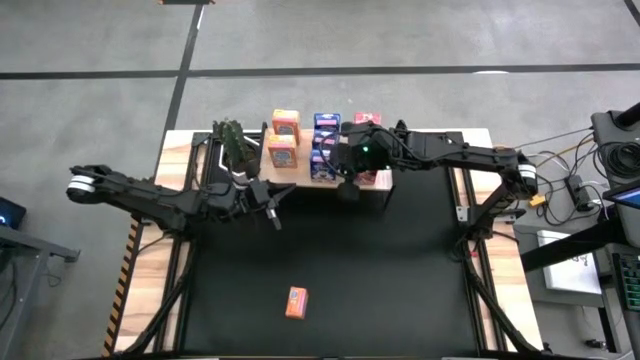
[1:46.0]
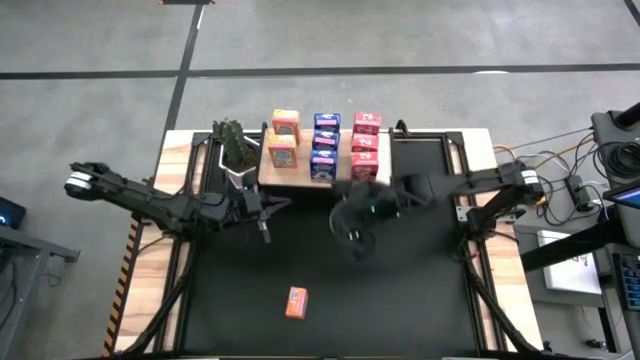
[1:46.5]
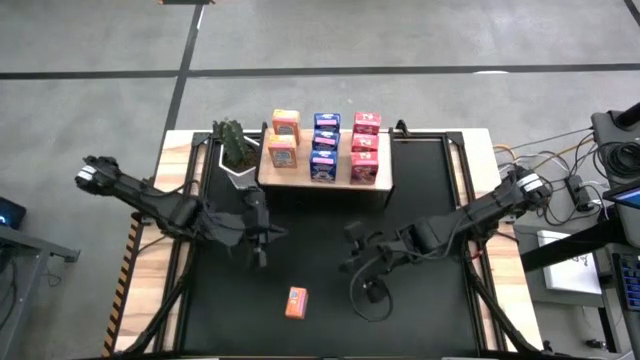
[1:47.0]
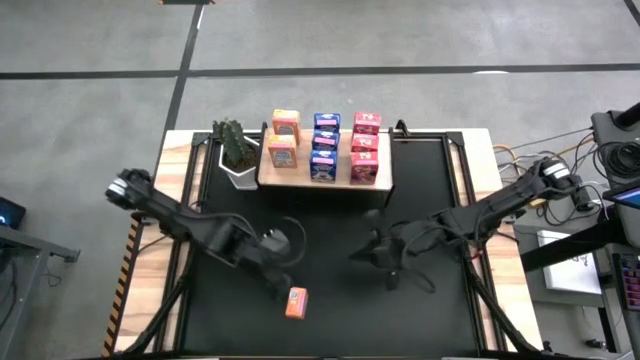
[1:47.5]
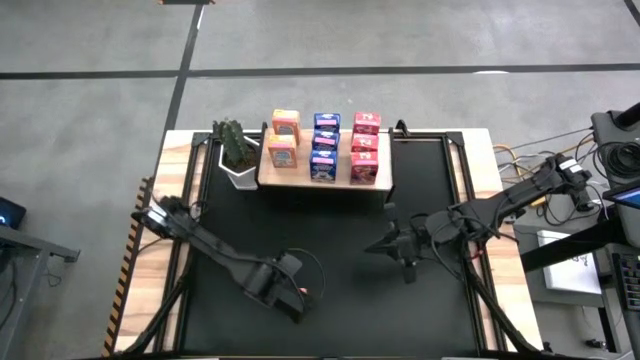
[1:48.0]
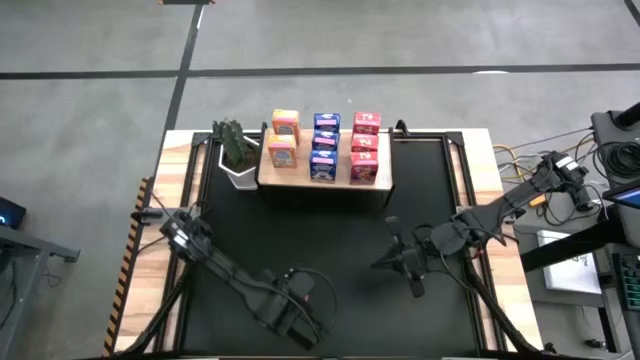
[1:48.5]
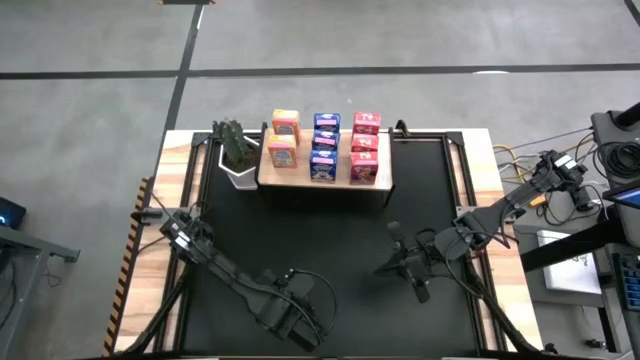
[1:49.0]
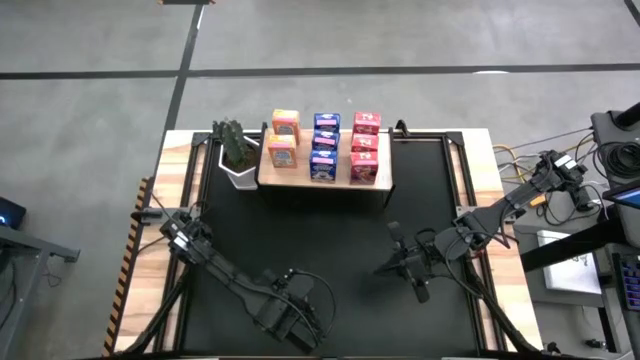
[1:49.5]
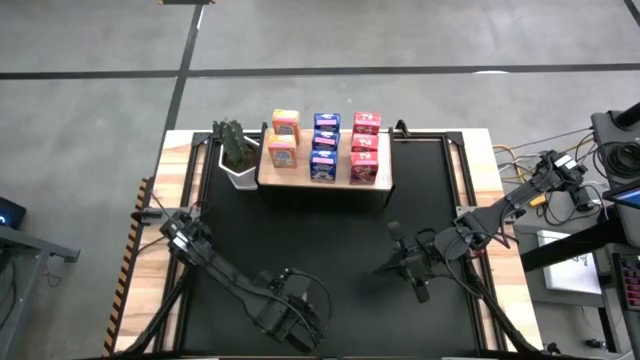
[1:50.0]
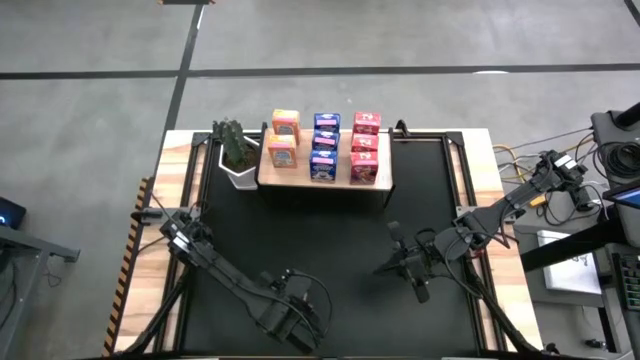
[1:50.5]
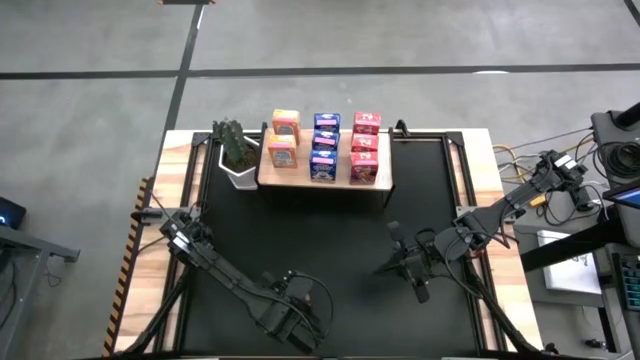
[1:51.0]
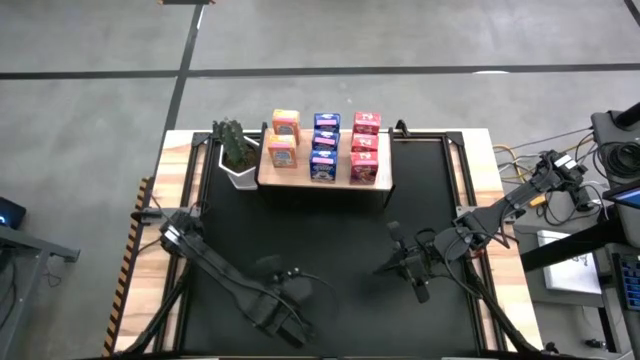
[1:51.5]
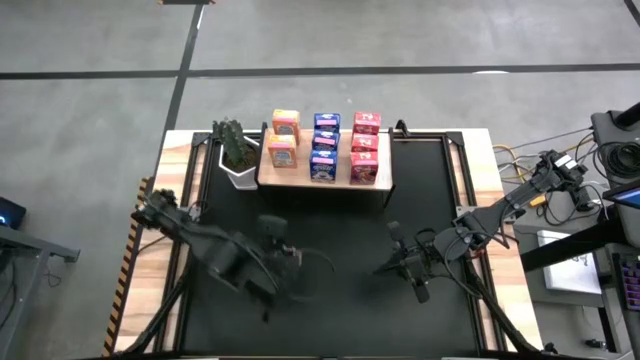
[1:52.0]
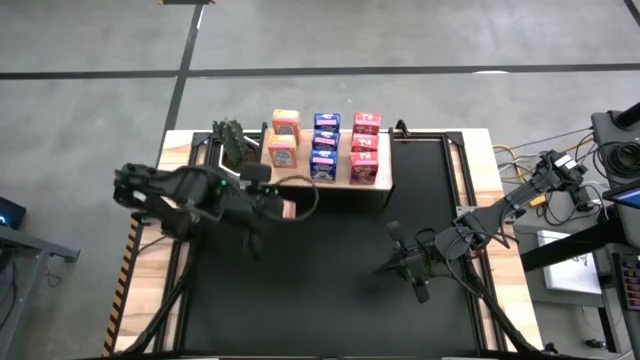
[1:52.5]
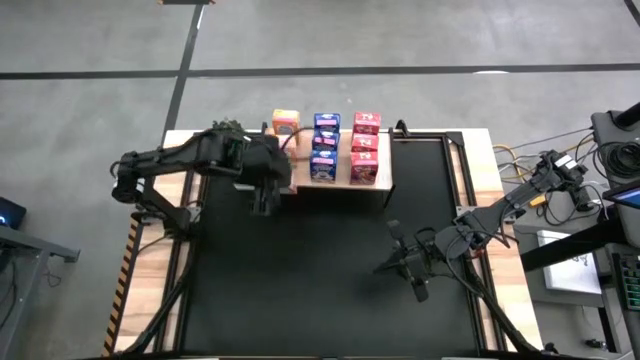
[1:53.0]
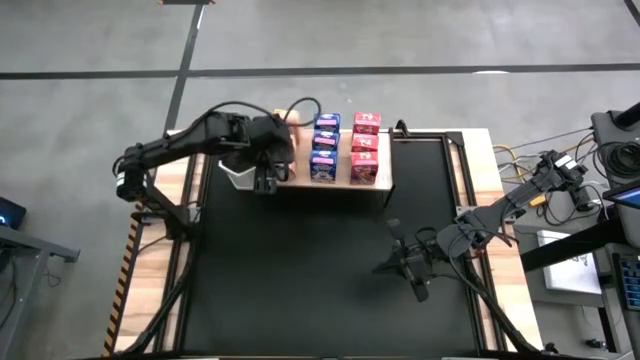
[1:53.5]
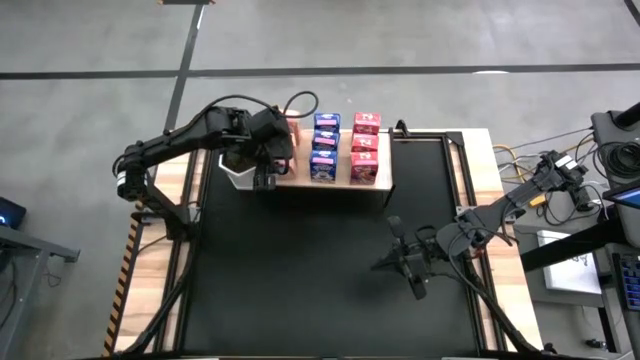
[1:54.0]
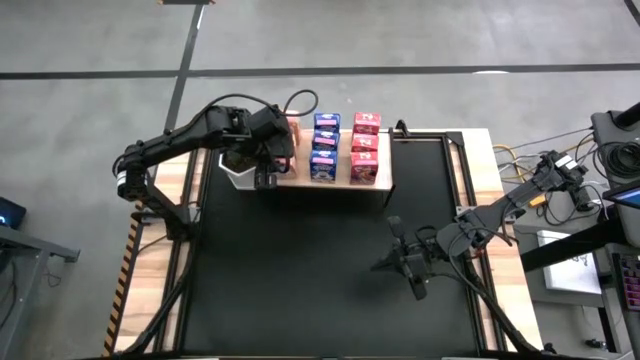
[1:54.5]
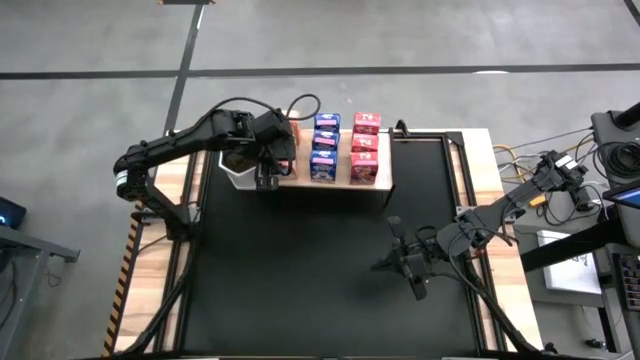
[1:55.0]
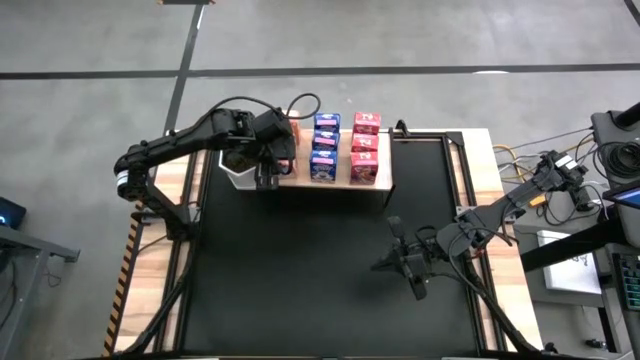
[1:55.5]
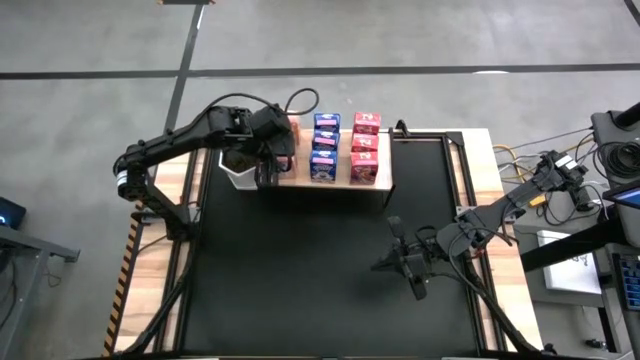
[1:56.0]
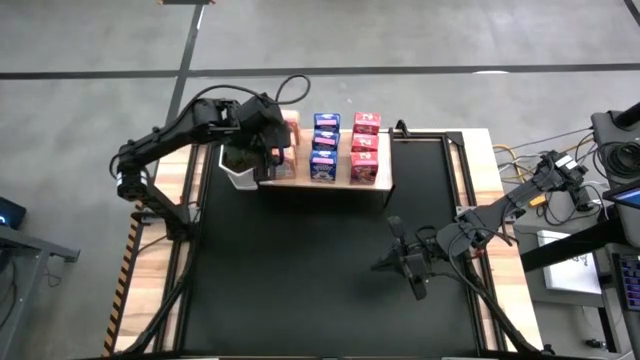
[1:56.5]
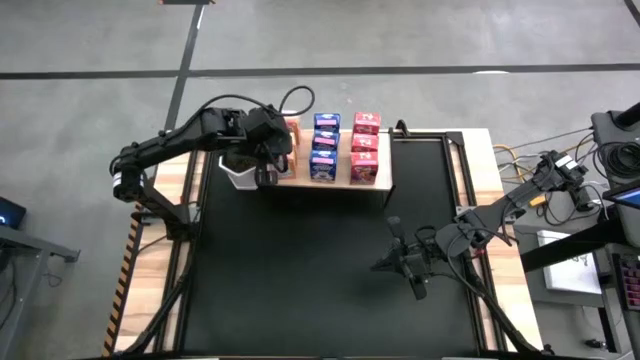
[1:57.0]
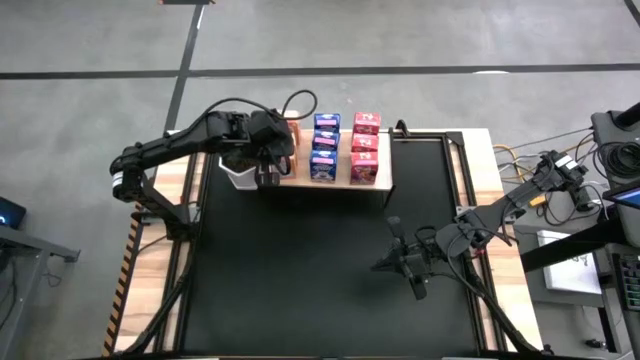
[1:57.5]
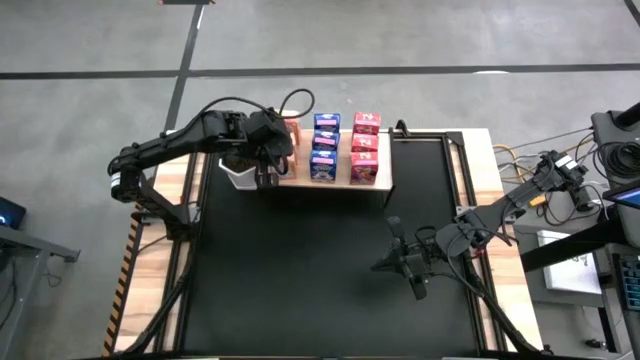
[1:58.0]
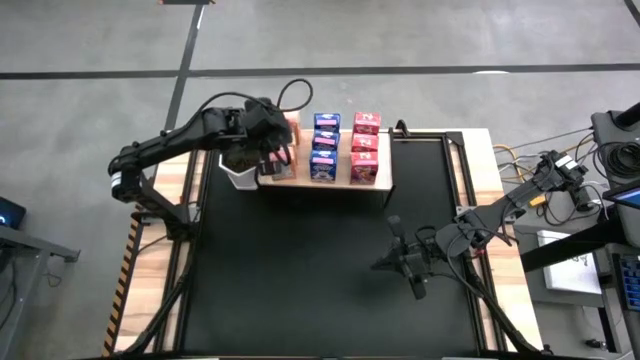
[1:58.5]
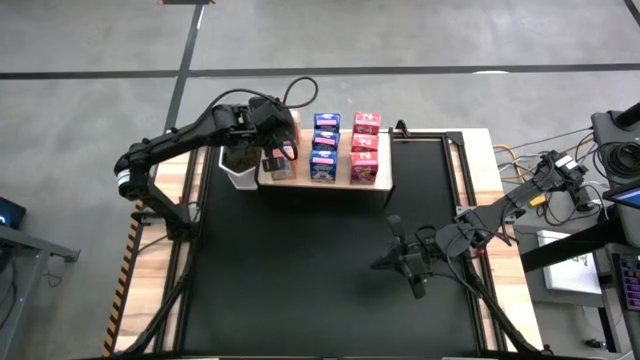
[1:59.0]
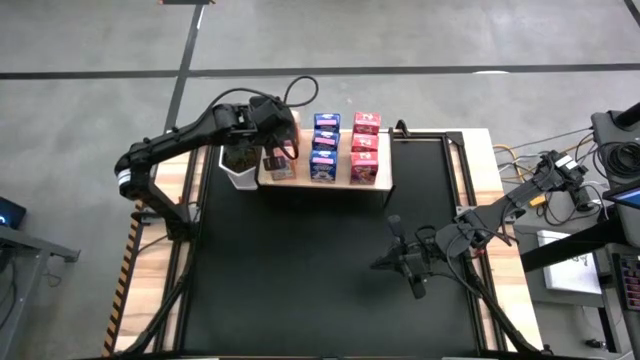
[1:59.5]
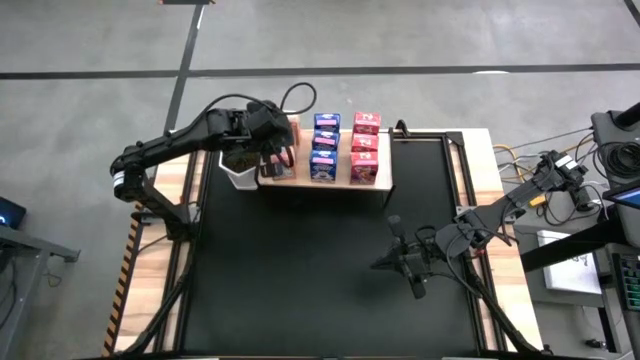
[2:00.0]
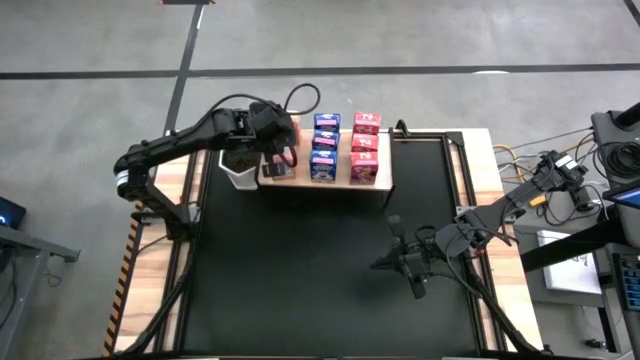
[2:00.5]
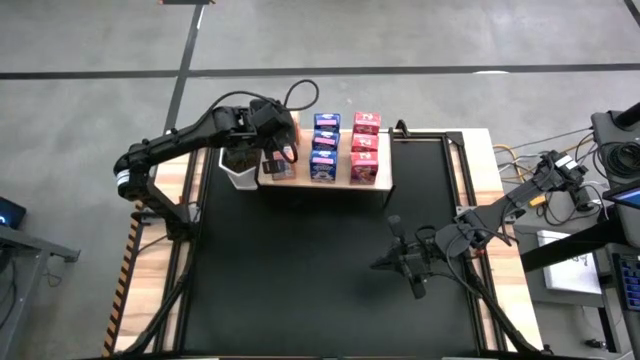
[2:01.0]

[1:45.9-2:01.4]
Task: Stack cereal on shelf
Put the orange cereal box on the shelf aligned with the other orange cereal boxes

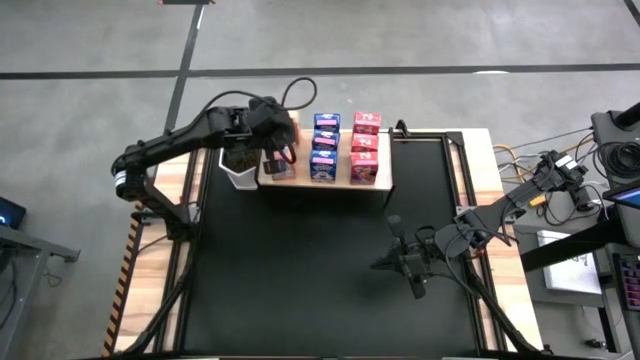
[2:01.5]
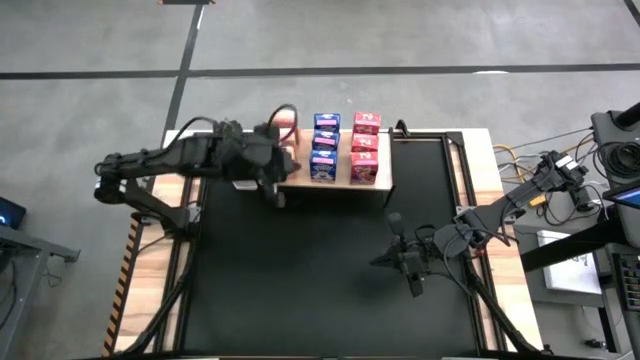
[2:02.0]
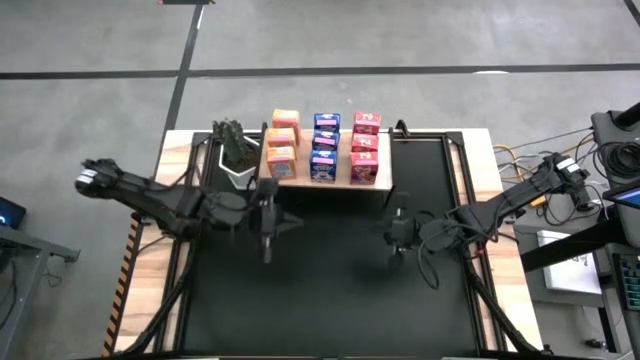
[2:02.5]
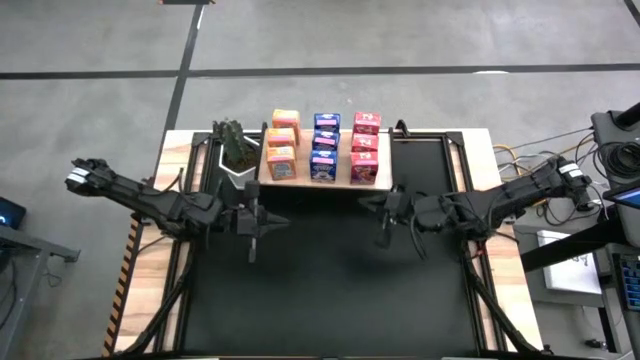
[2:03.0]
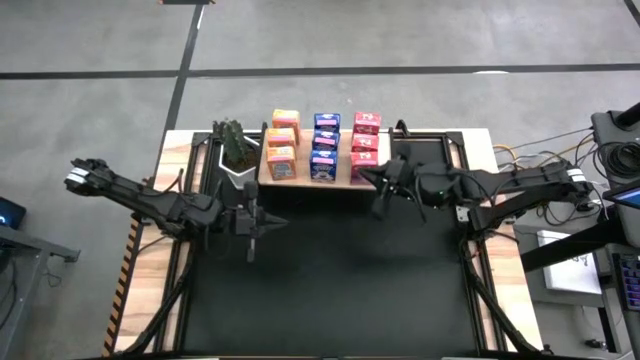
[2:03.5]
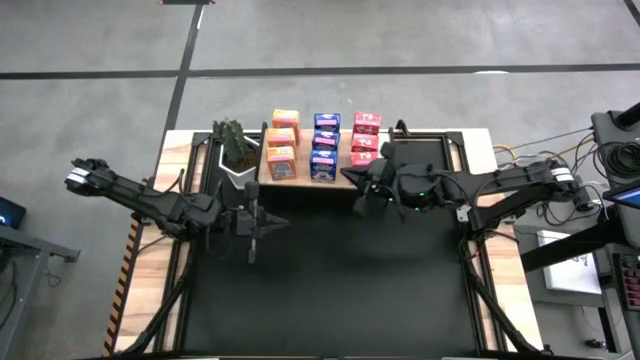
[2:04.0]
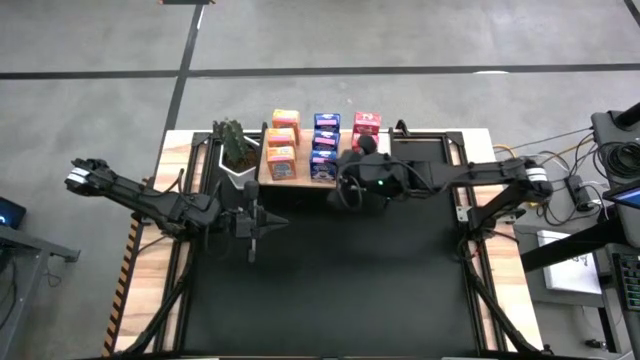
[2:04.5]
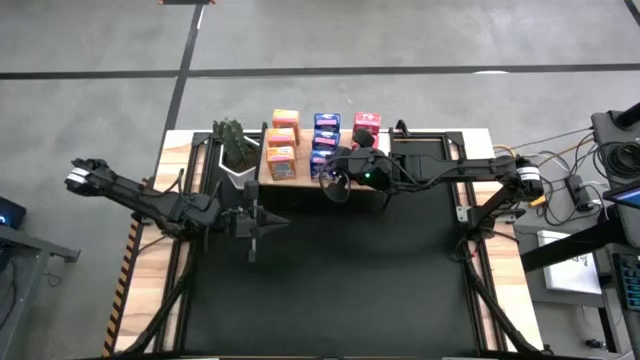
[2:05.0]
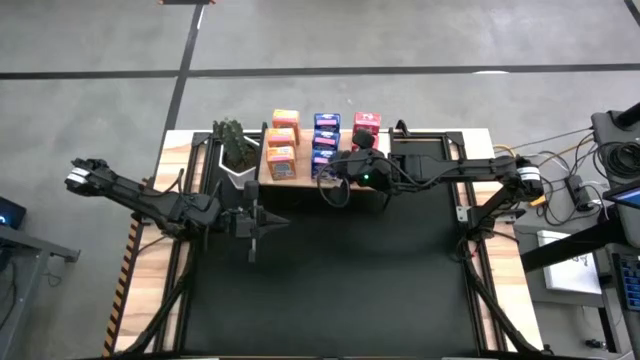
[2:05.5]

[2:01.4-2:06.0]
Adjust the blue cereal box on the shelf

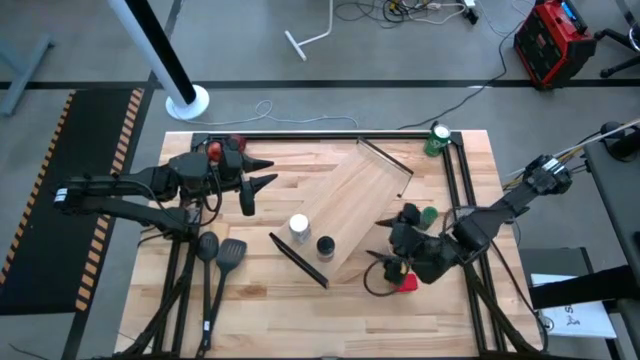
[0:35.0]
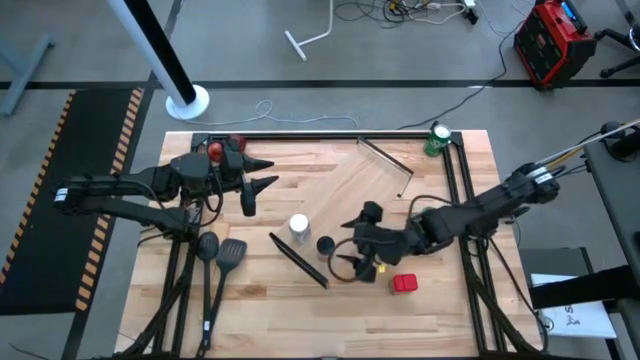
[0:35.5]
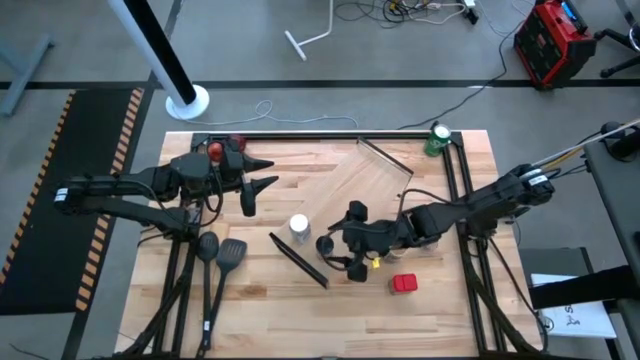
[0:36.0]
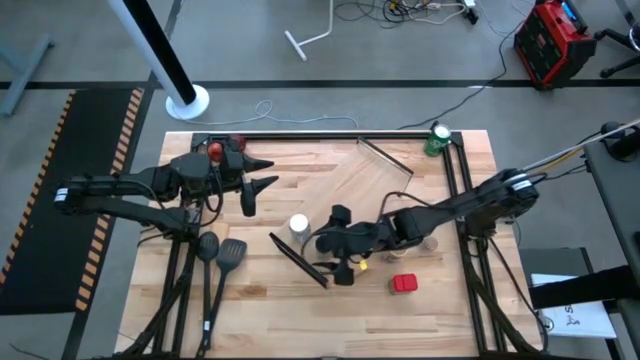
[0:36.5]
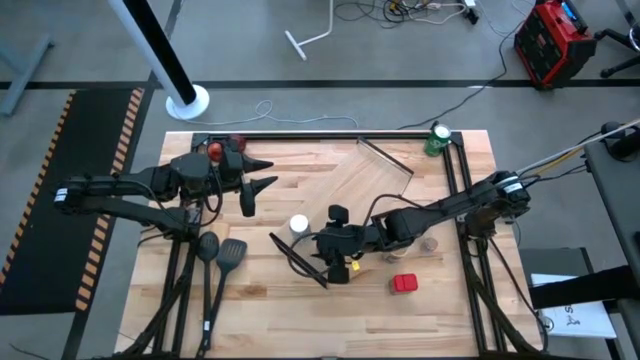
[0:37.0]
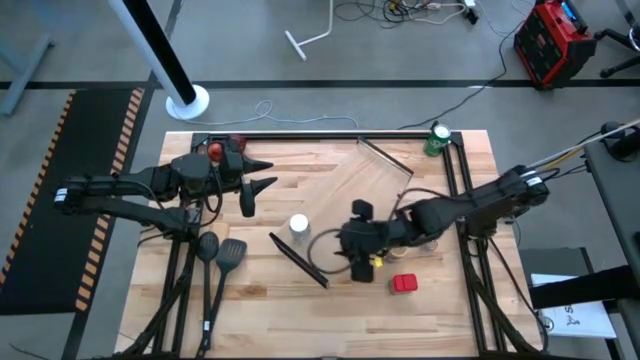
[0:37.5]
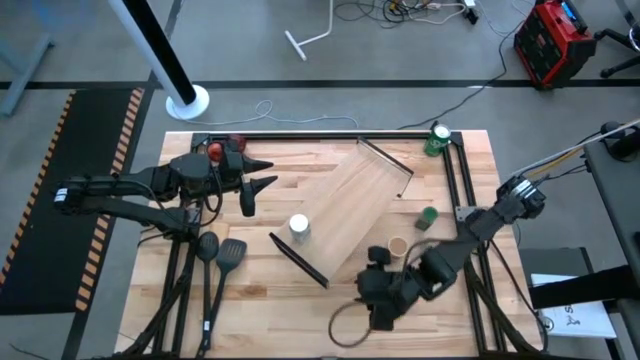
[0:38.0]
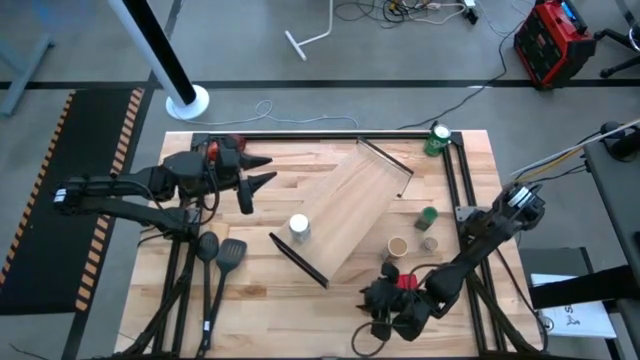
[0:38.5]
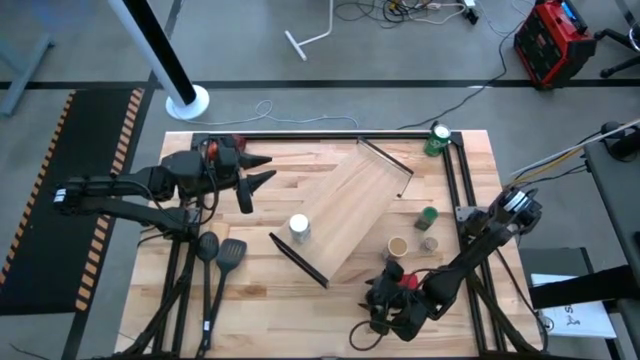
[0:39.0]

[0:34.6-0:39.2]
Task: Shelf spices
Remove the black seasoning bottle from the shelf
